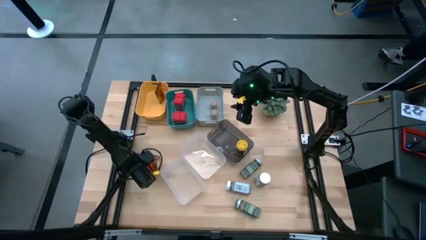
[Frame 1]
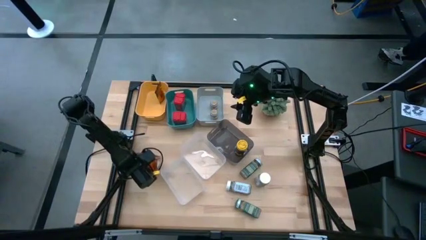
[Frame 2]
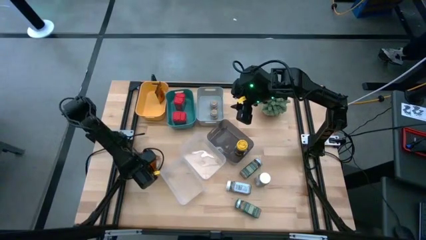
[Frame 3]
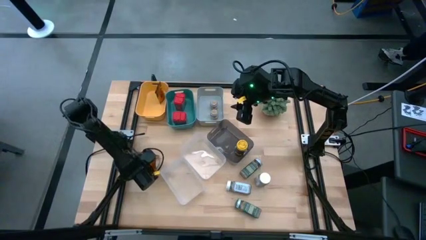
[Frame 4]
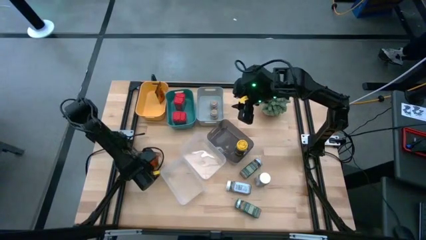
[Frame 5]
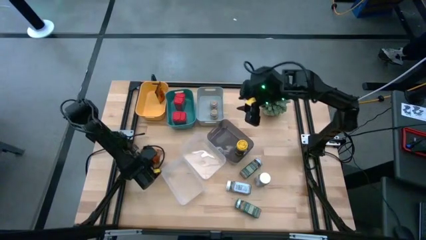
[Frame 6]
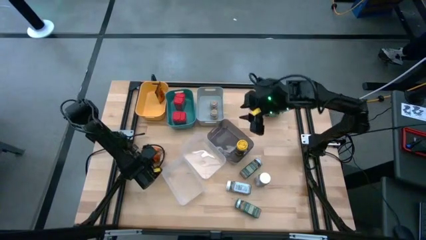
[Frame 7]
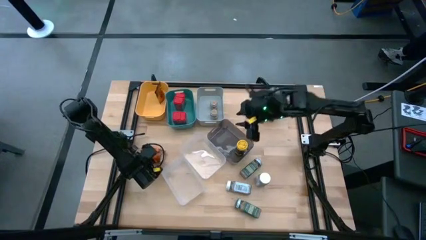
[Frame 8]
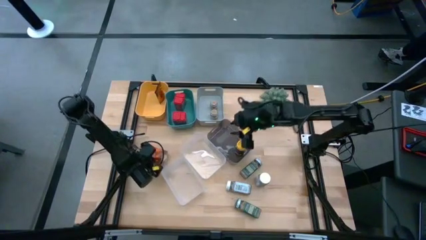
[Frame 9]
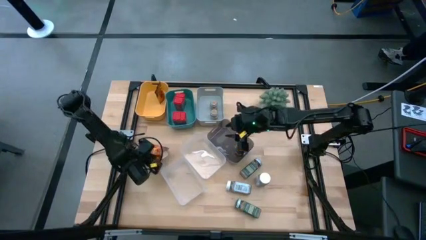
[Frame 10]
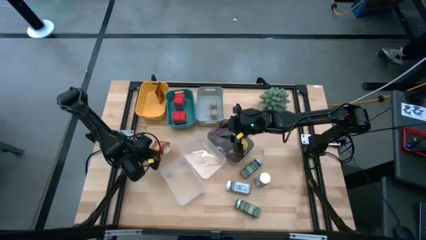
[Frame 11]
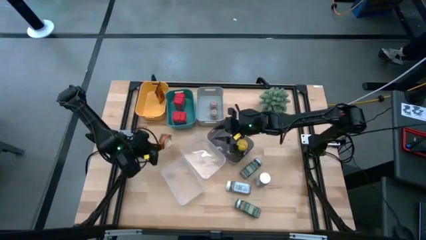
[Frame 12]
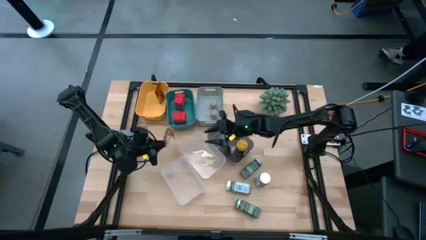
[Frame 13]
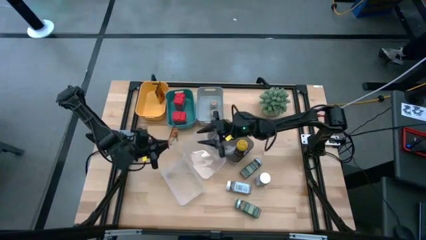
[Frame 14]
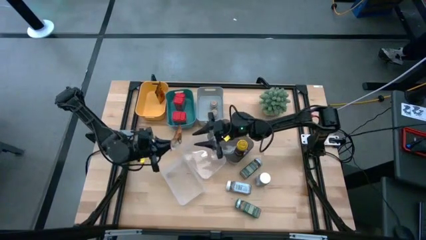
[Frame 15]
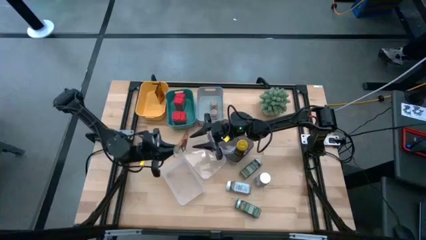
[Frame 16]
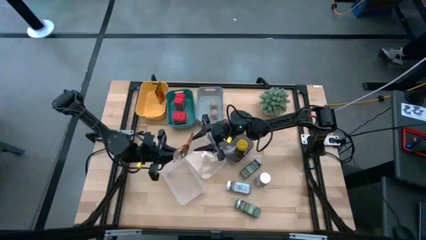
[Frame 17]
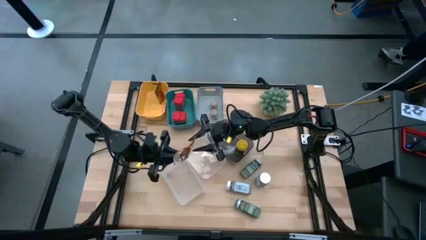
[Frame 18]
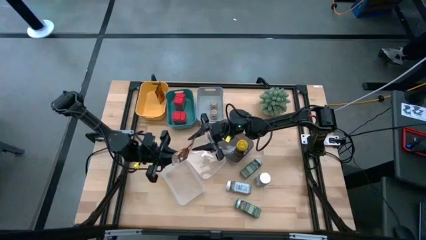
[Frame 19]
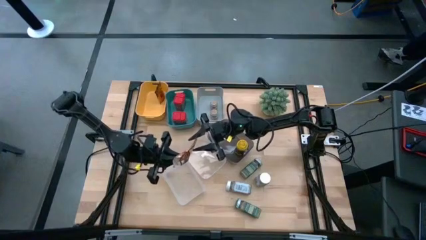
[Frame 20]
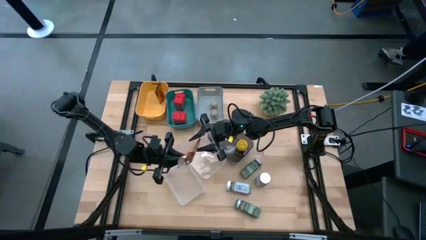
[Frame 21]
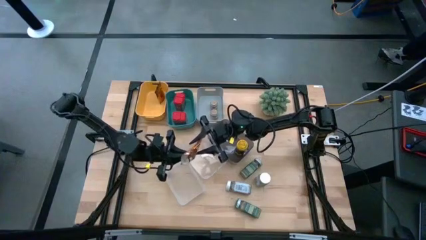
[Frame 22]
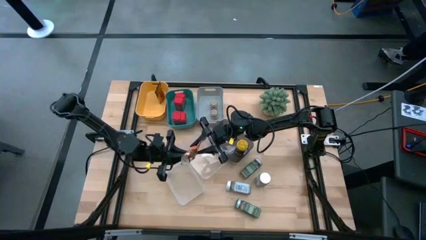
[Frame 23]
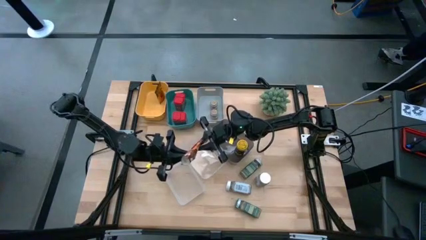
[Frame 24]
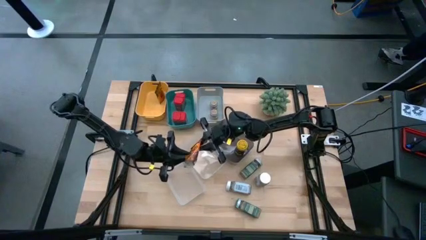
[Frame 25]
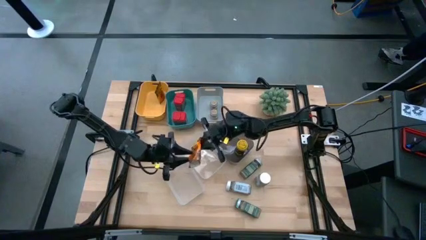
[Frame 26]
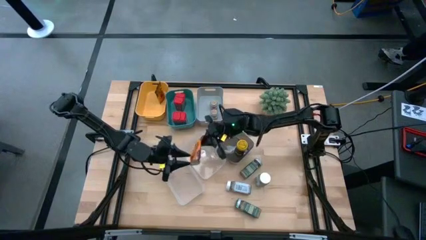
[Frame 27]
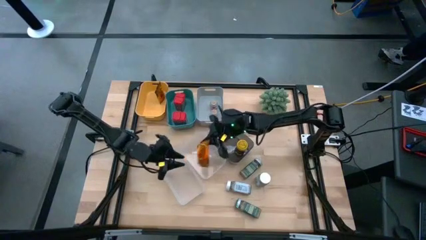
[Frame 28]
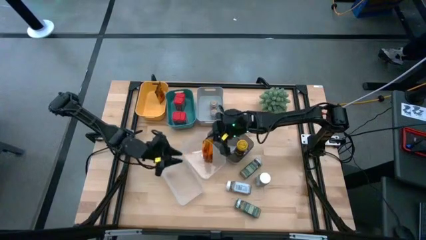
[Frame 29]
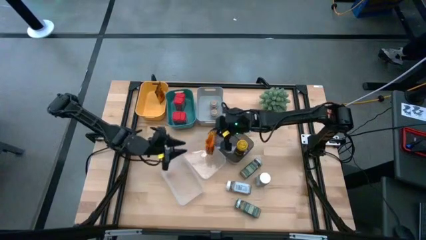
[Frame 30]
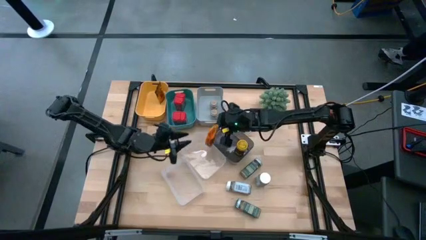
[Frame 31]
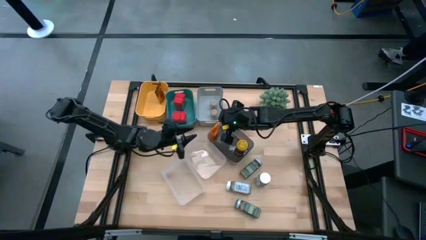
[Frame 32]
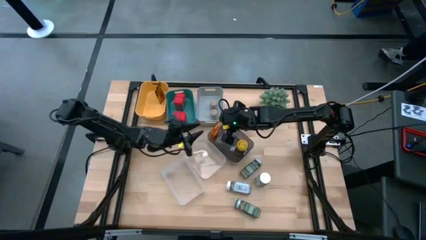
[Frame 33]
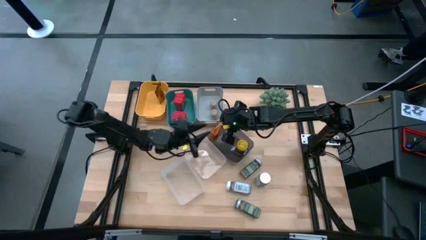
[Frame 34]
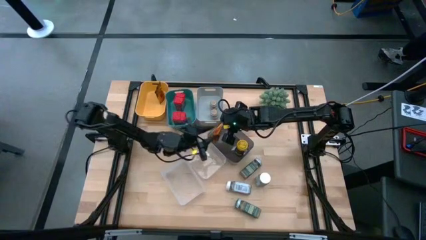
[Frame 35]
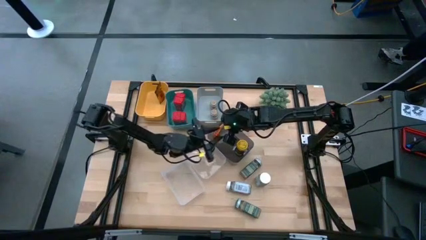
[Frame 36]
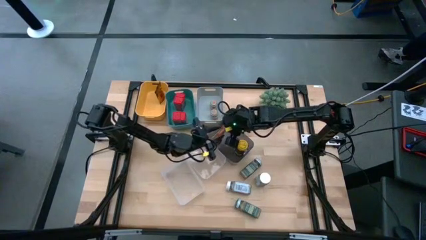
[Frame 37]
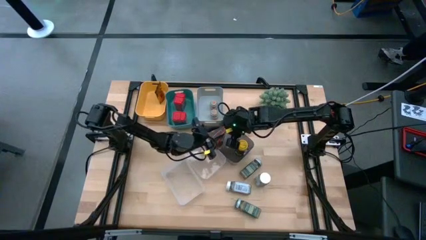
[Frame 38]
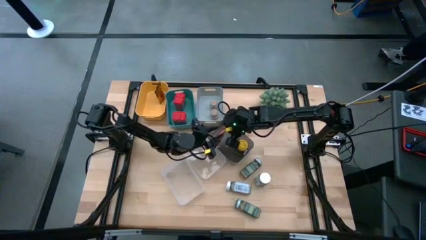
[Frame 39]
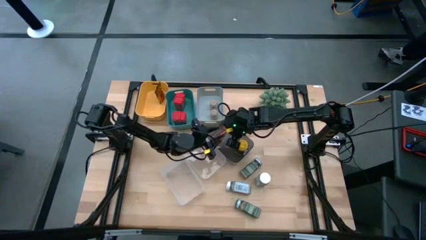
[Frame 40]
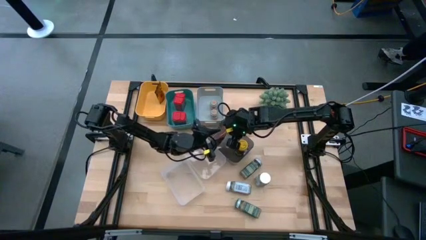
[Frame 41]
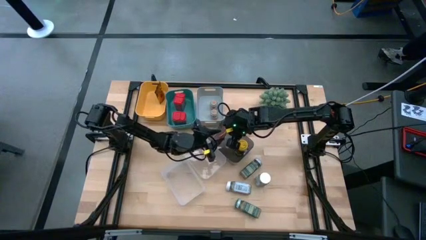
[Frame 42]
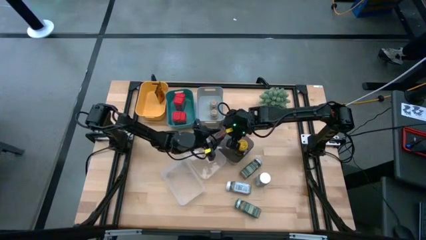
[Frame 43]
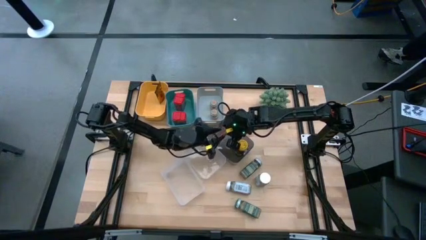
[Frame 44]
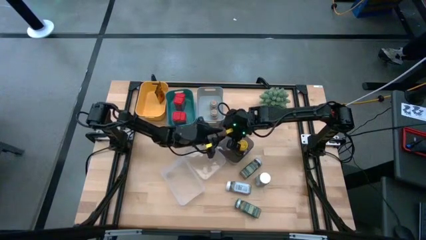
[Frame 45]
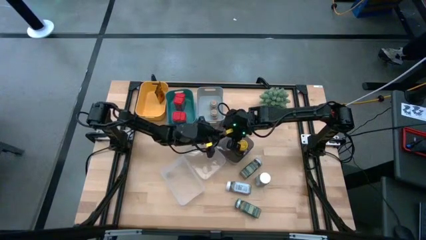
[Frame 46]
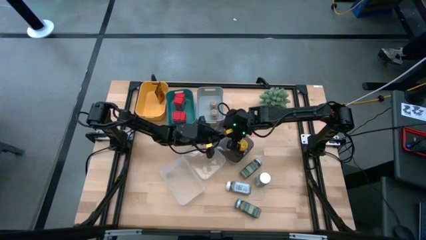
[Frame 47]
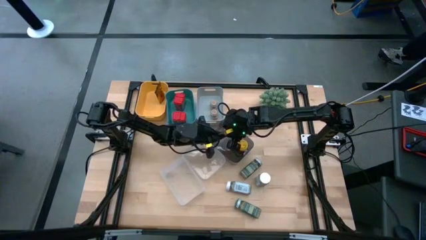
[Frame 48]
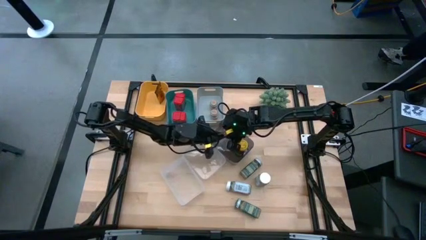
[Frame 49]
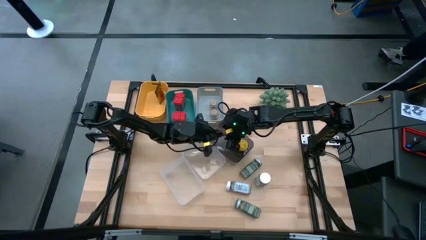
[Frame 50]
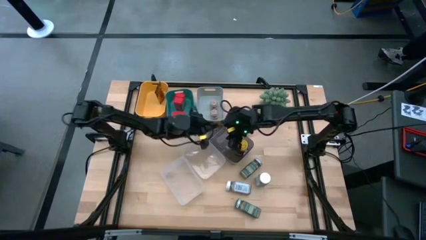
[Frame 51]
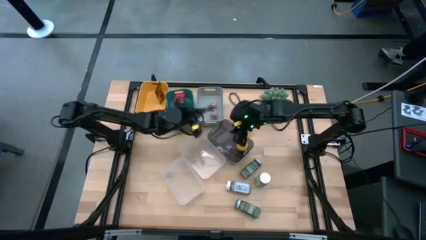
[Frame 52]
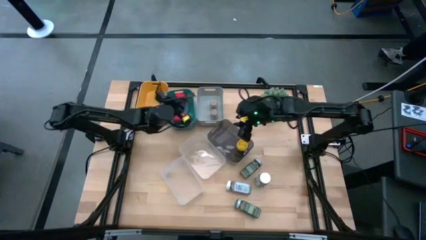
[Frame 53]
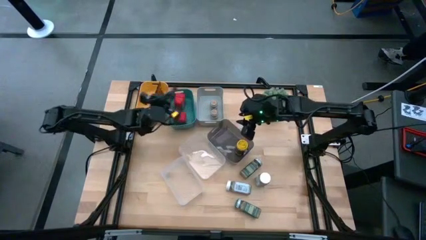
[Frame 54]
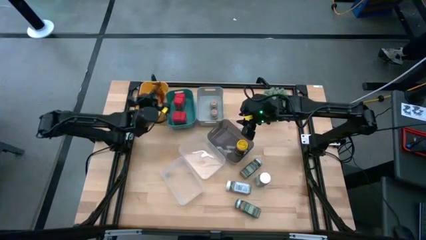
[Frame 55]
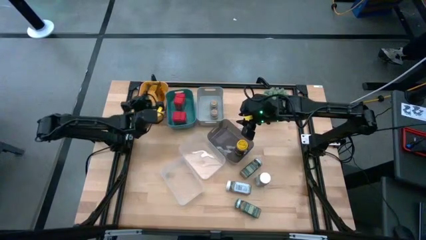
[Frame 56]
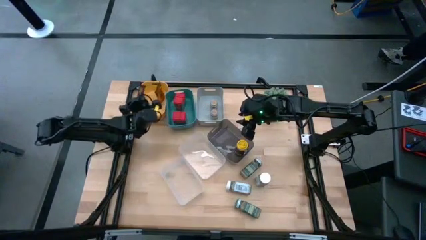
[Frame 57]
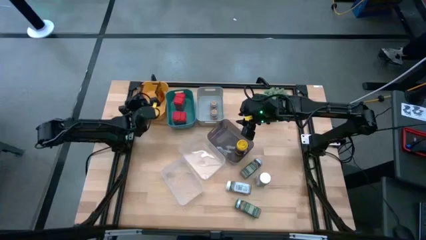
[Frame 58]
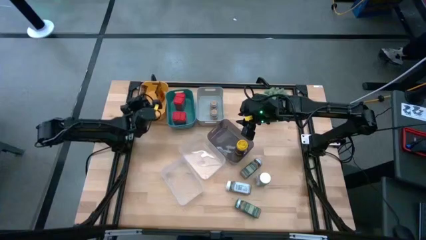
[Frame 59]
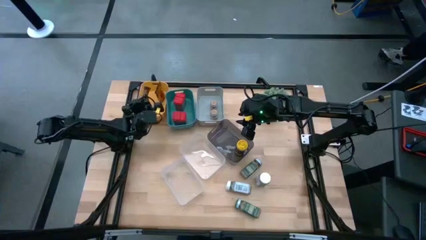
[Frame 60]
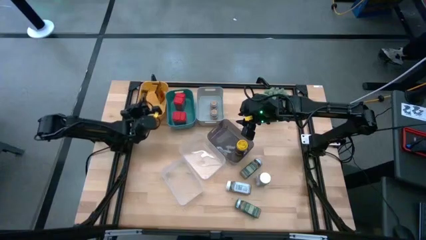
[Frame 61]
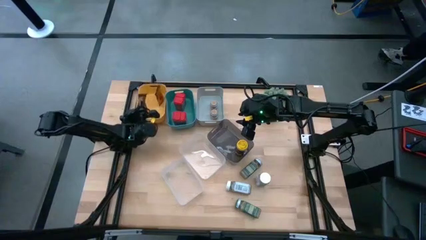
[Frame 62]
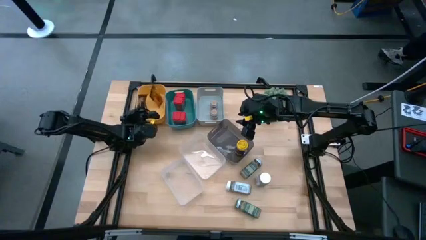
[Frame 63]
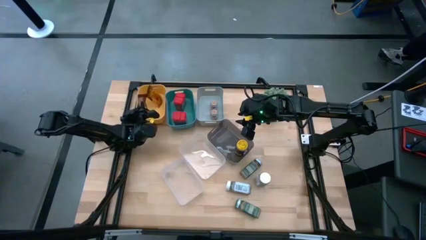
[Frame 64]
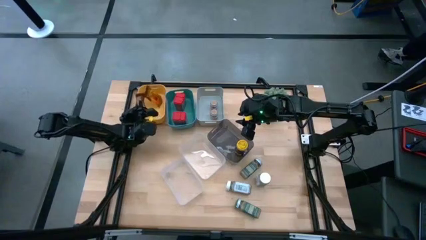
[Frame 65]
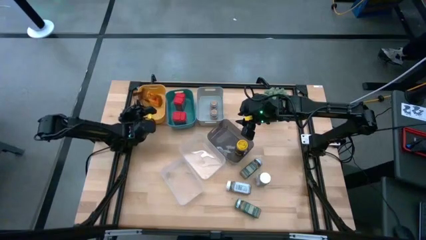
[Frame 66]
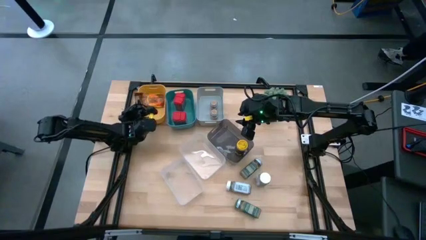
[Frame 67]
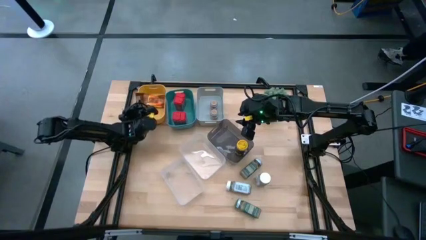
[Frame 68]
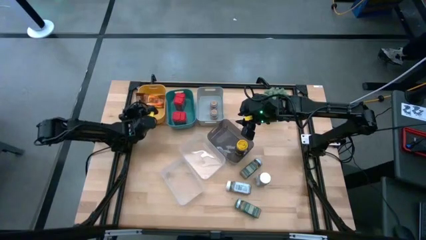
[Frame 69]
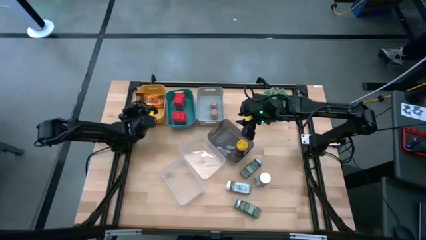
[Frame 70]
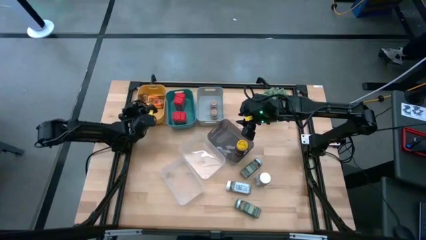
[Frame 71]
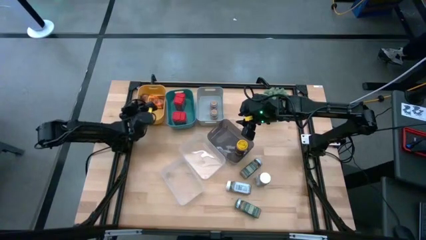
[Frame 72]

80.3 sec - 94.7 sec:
Task: Sort spices by type
Put the orange seasoning pack into the yellow bin

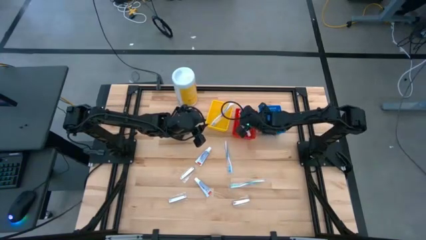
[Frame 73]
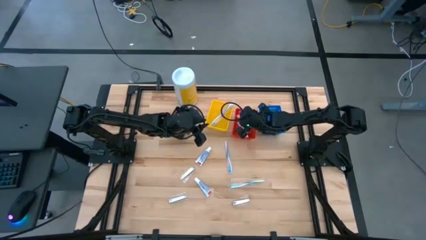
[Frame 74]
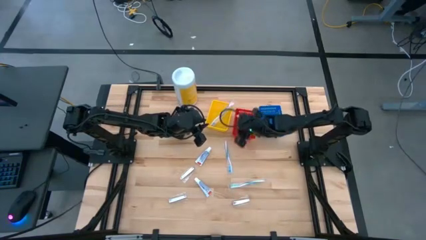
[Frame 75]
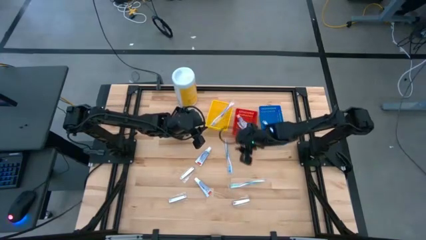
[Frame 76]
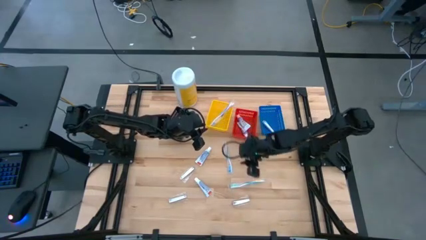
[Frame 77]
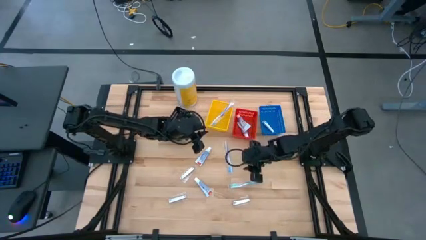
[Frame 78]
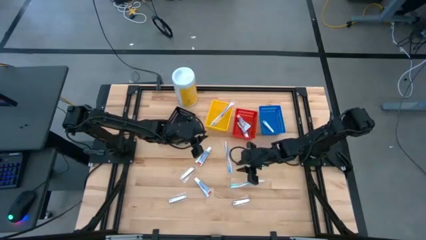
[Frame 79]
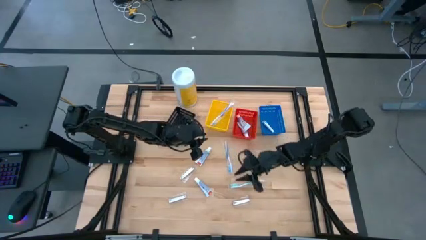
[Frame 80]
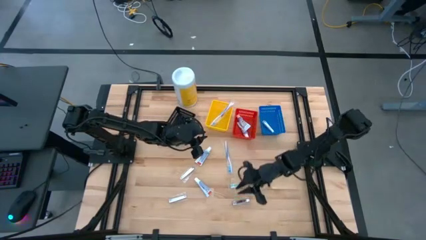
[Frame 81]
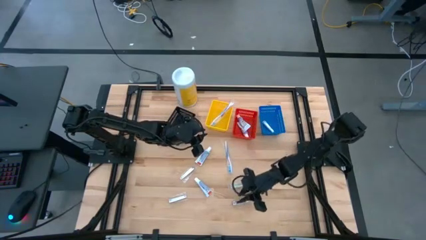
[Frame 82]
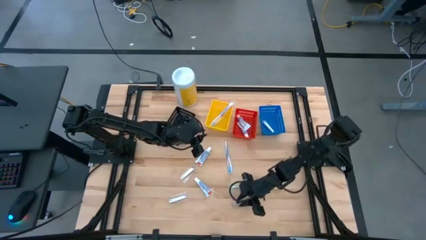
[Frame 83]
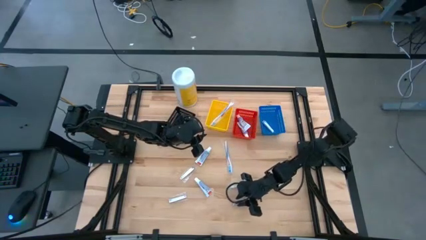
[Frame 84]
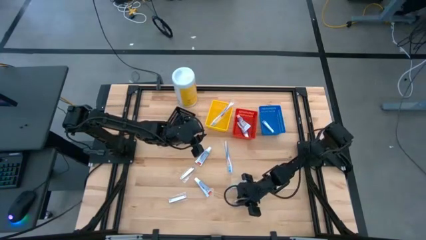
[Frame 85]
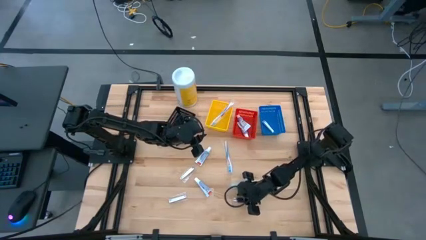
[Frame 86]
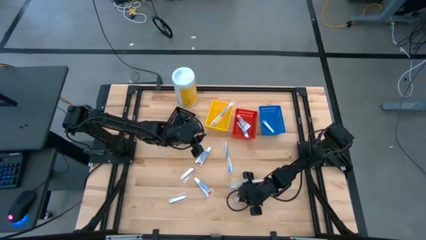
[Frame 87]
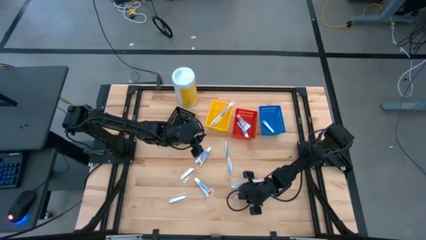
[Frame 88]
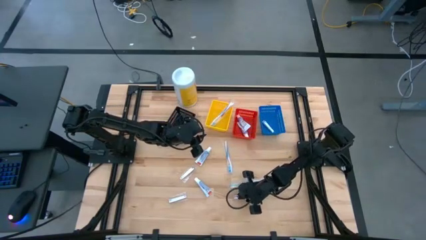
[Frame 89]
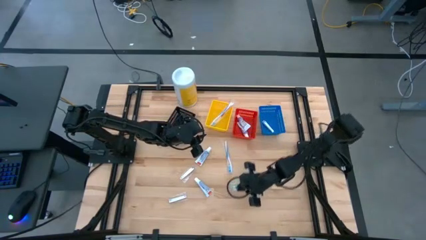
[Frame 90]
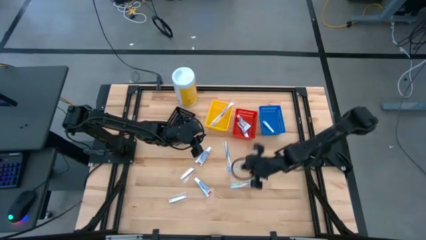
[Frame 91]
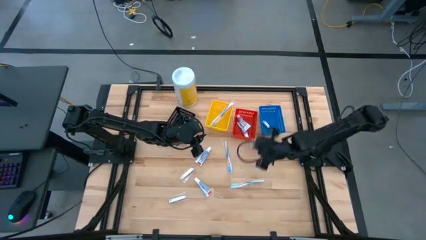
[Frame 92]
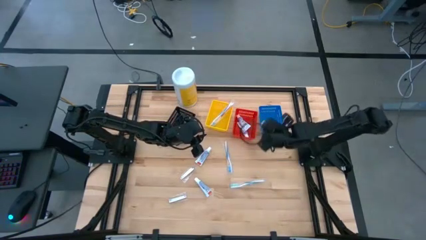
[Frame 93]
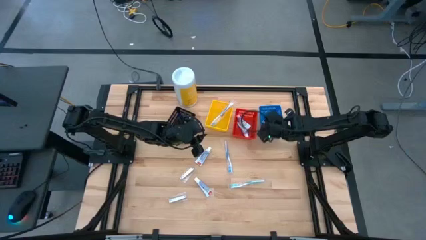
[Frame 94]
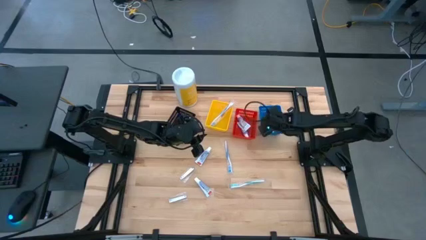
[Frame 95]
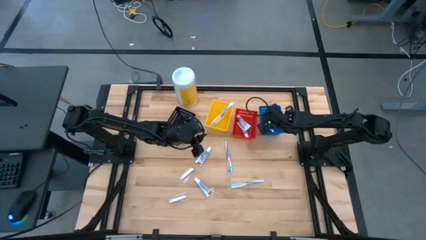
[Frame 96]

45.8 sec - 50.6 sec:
Task: Pick & Place Travel size toiletries
Put the silver nail cutter into the blue bin
